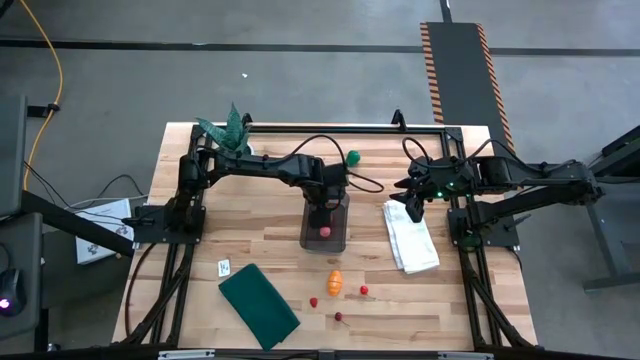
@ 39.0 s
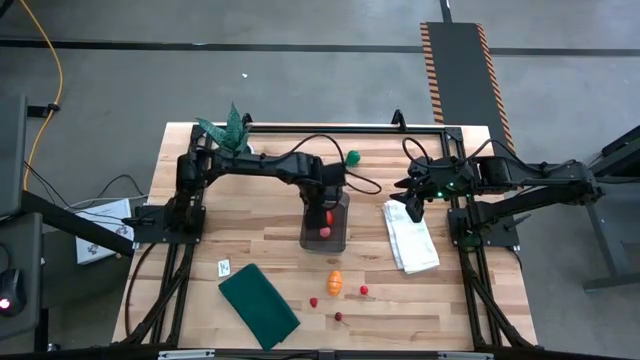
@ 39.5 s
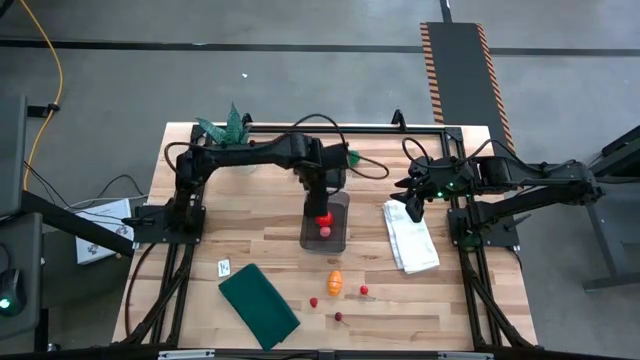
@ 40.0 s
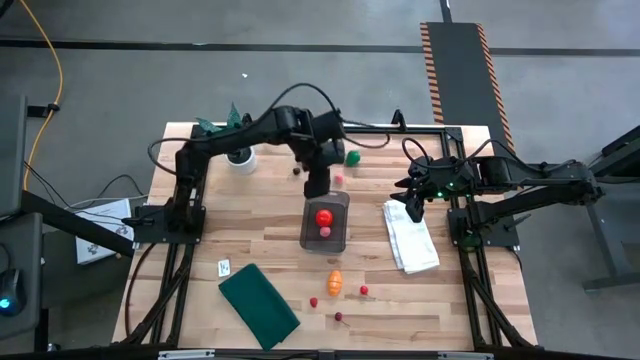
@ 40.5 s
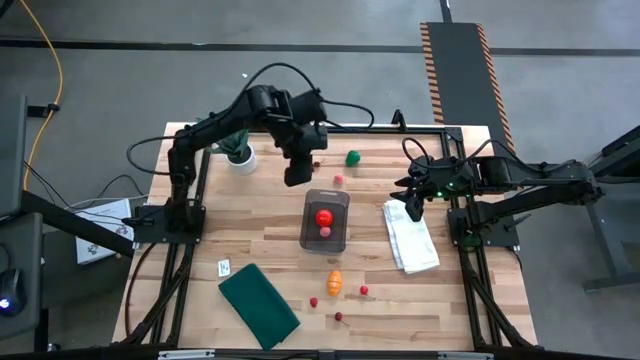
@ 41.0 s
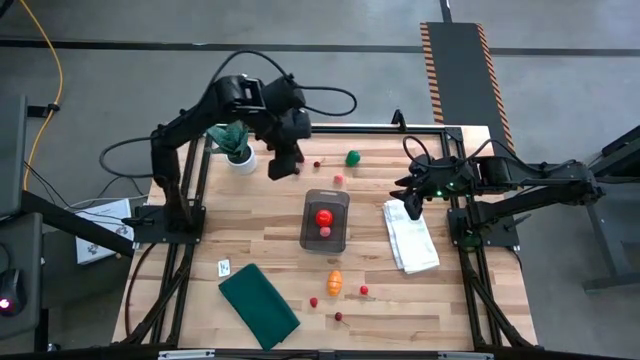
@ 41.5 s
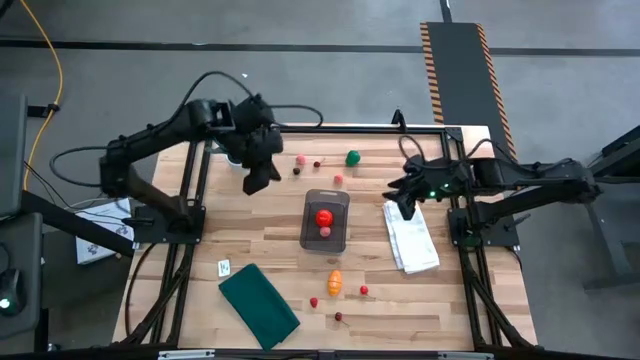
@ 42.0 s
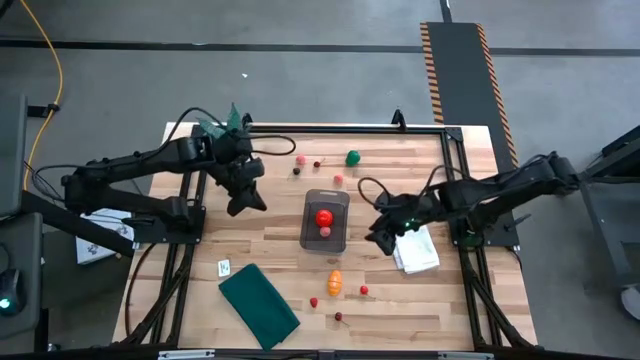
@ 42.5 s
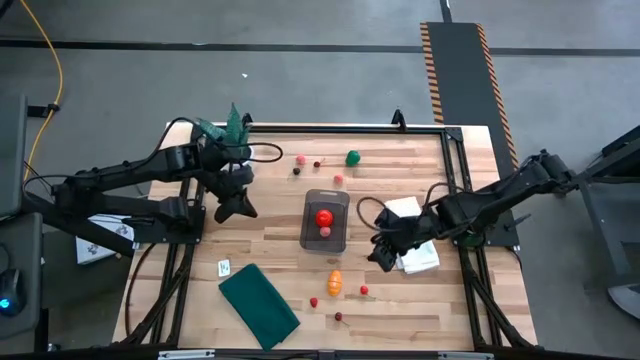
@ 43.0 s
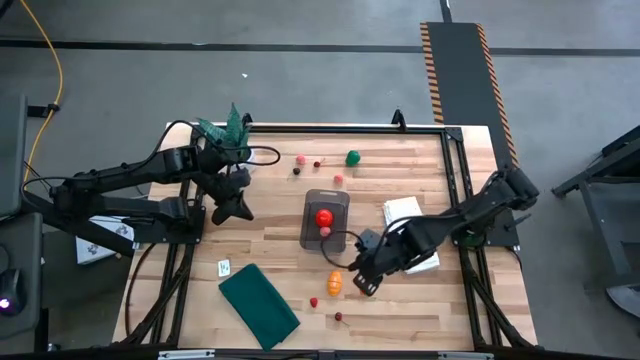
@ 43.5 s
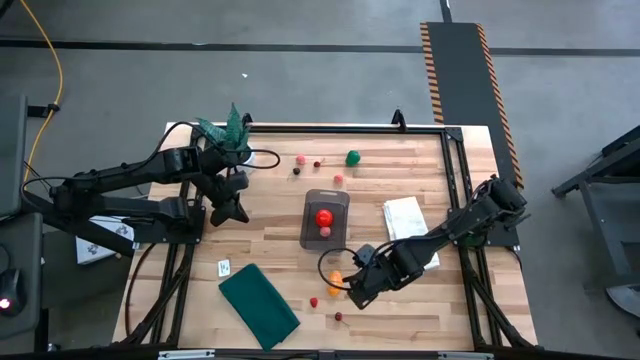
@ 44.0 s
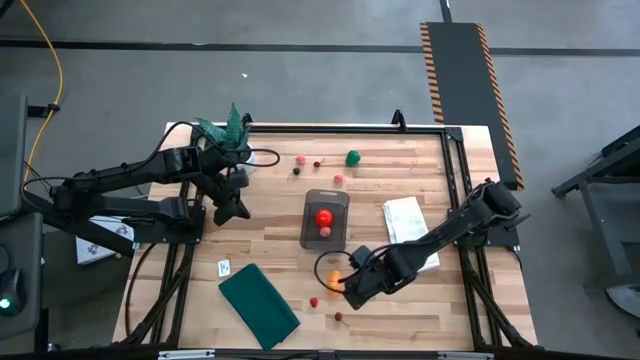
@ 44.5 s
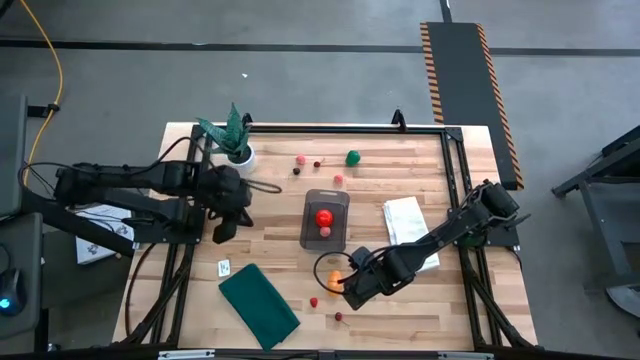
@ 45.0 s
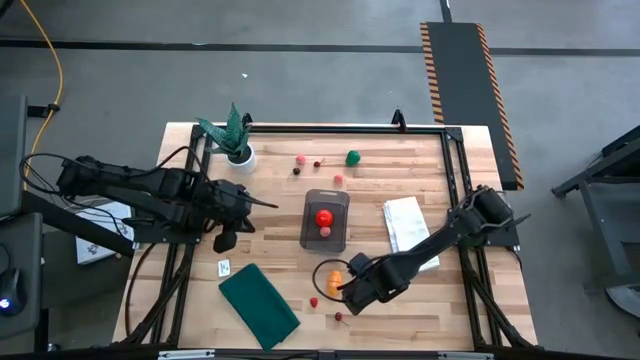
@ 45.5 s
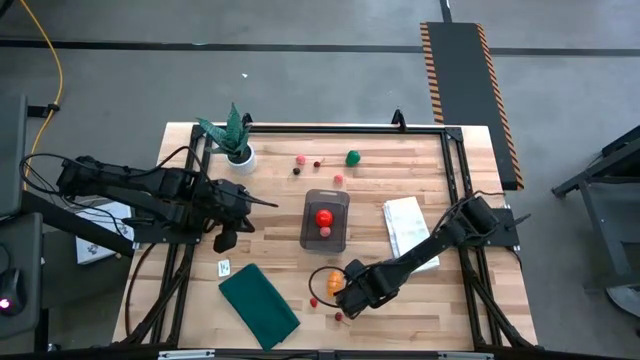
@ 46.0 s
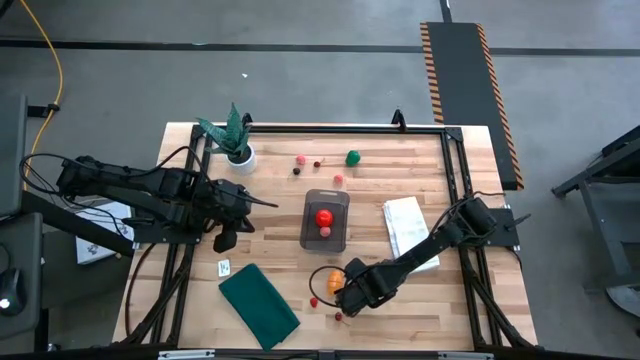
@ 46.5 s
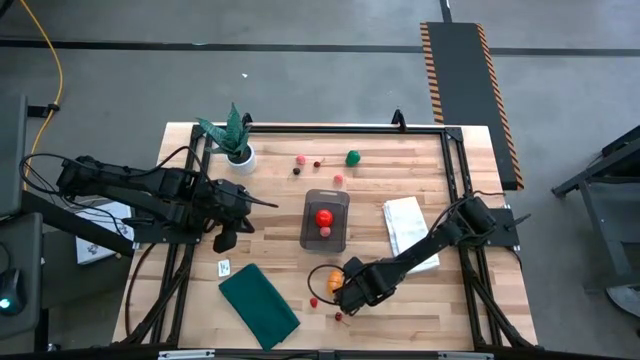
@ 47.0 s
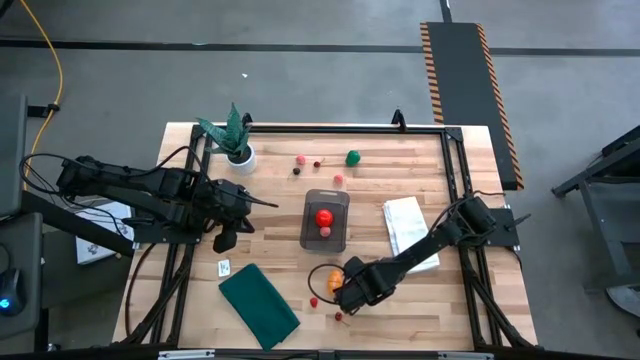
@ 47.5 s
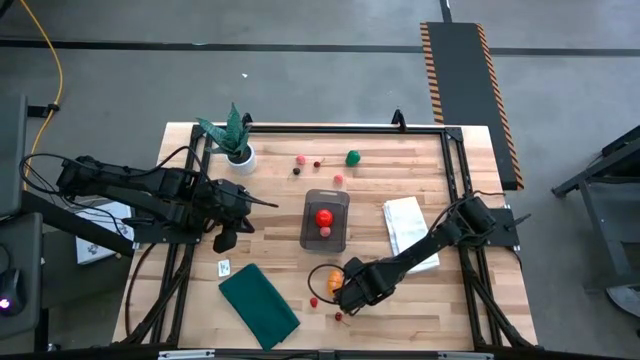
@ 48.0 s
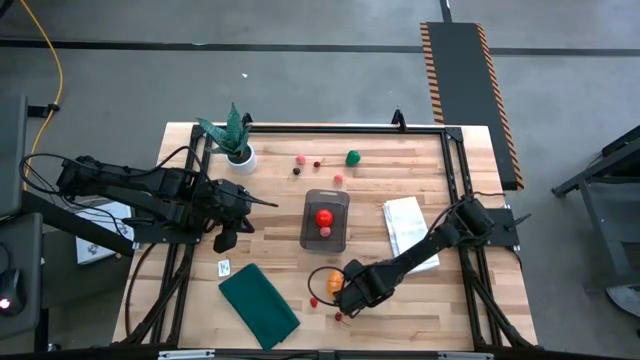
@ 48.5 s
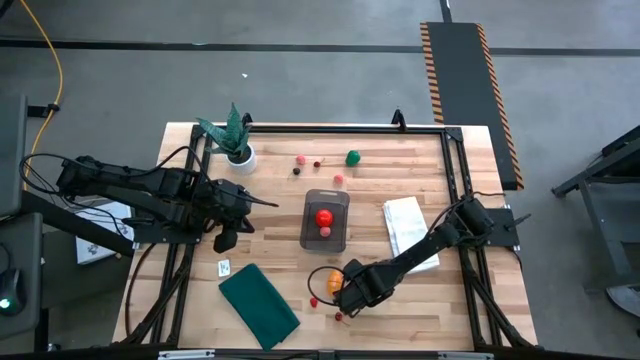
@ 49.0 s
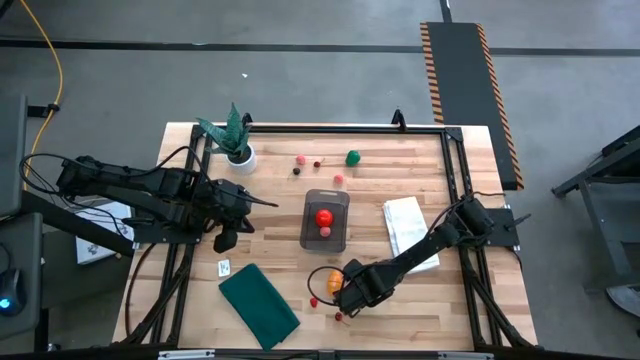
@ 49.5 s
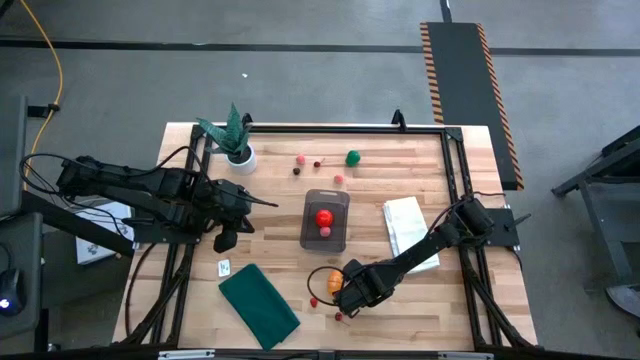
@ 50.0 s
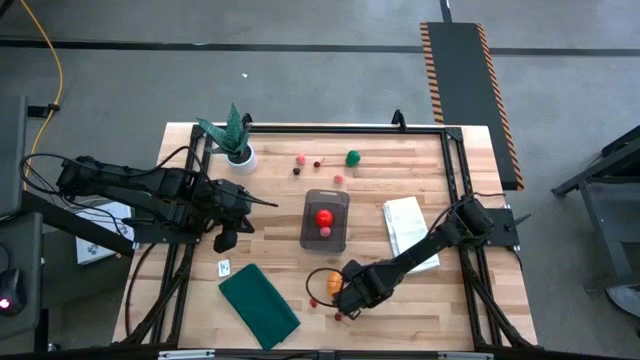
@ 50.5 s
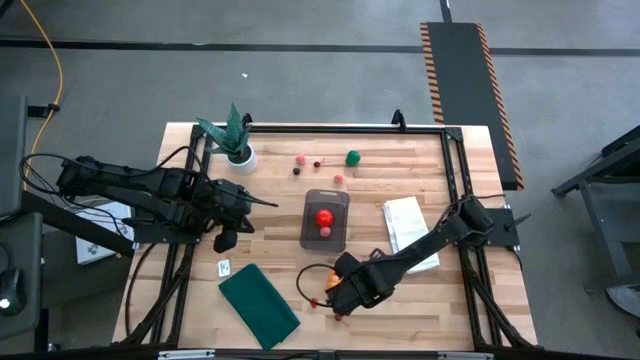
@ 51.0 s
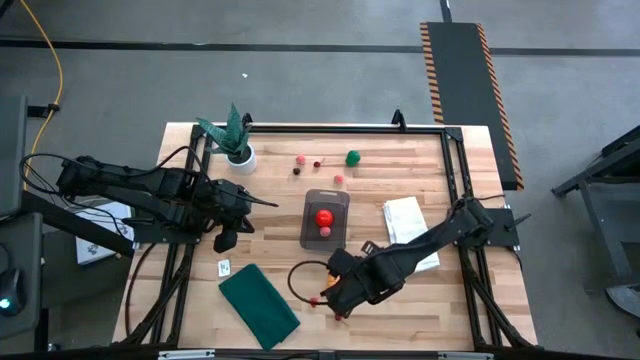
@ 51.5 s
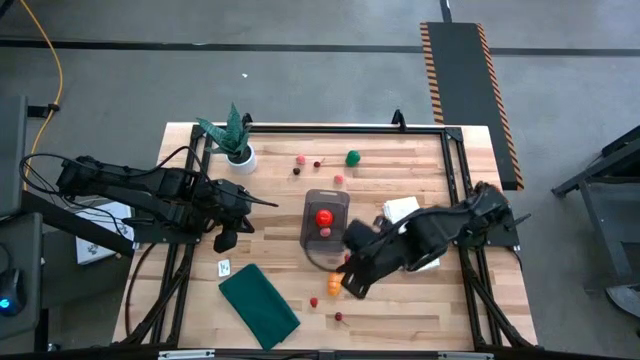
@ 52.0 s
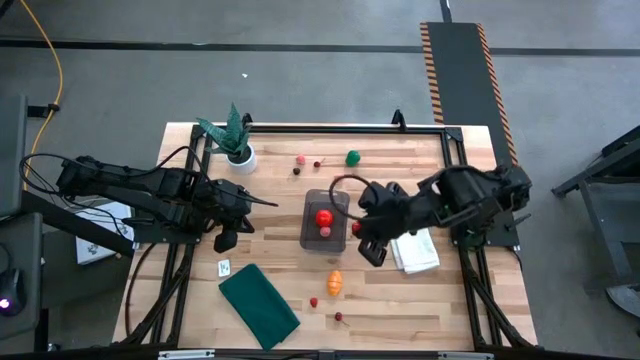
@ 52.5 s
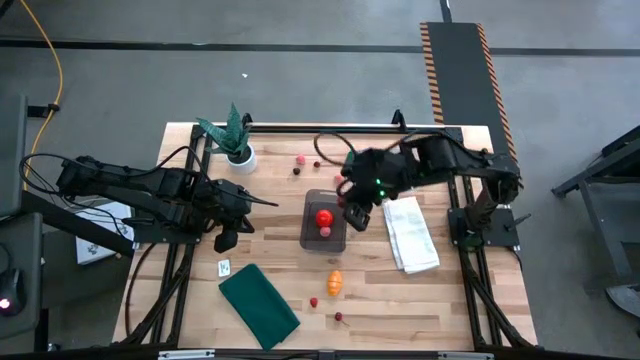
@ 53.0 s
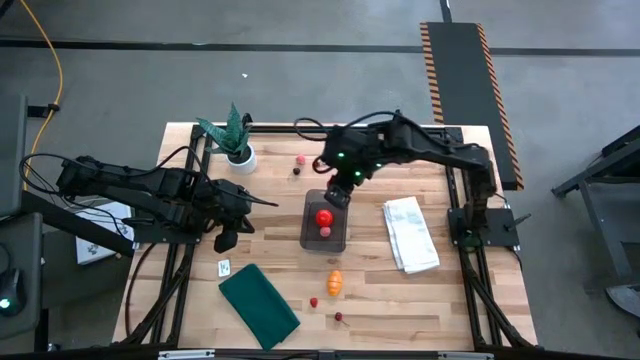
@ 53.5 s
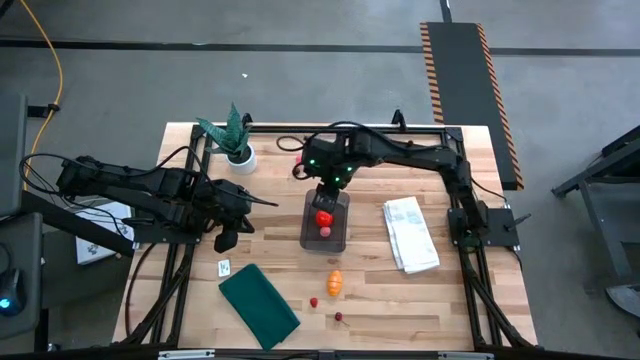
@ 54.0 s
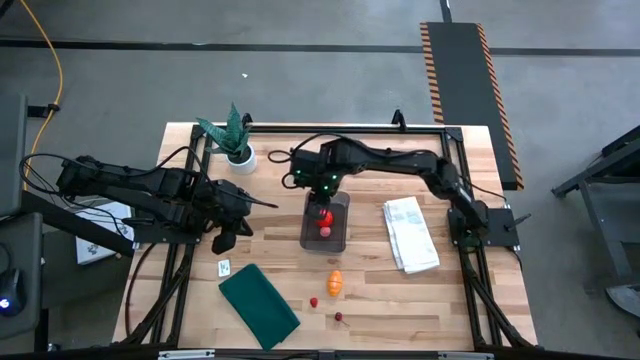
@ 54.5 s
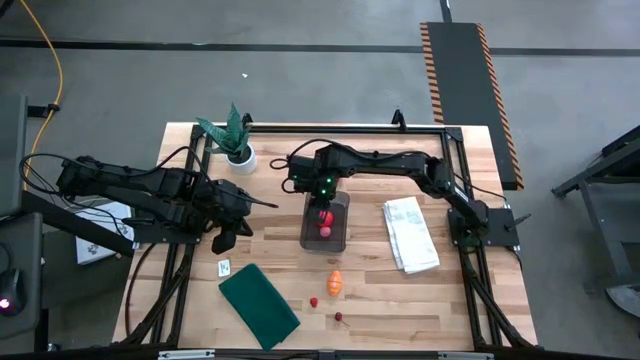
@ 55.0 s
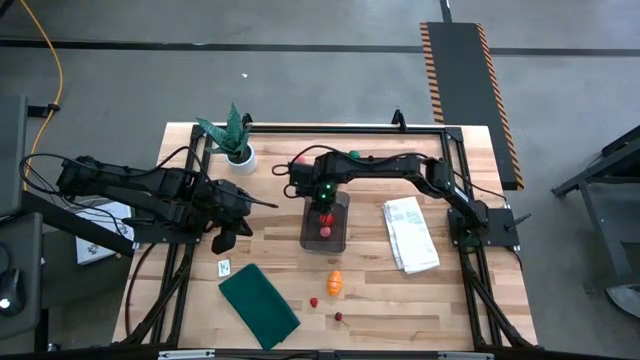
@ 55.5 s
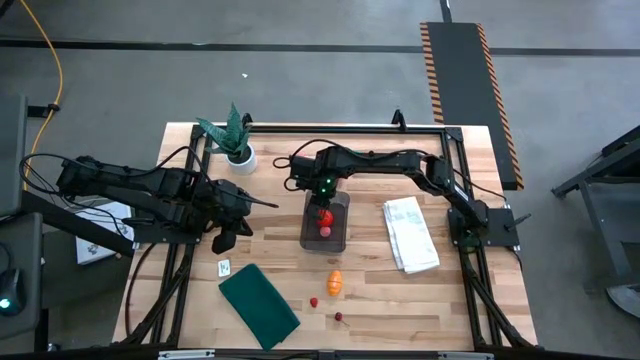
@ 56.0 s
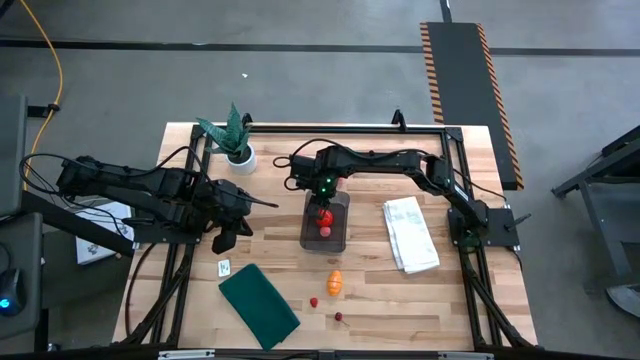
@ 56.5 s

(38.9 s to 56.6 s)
Task: Pick and placing Produce into tupperware
Put the red cherry into the transparent black bin
